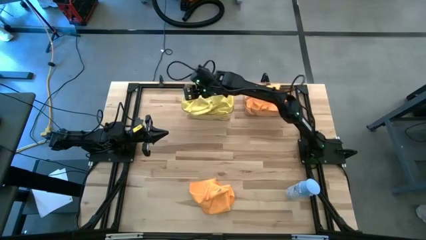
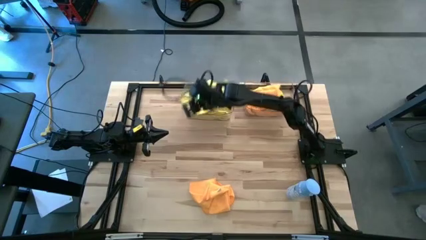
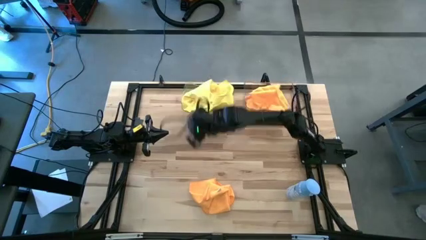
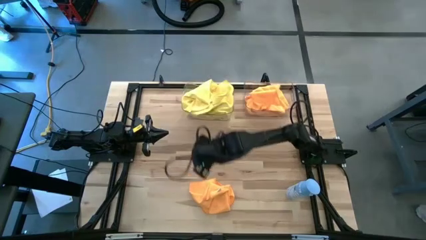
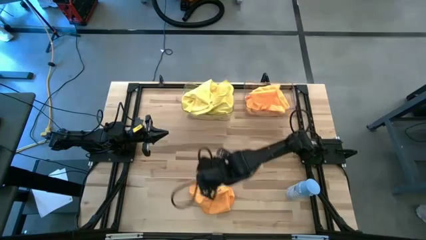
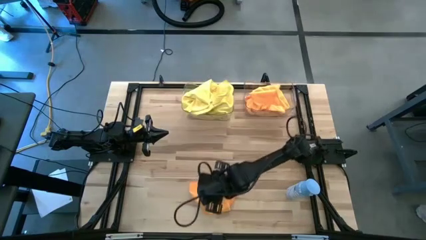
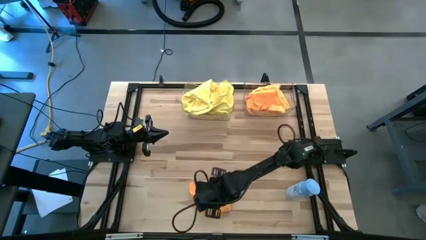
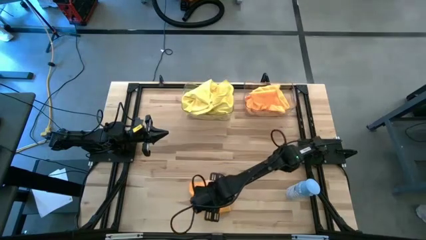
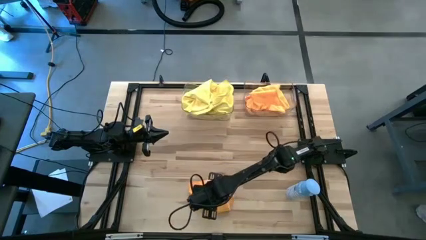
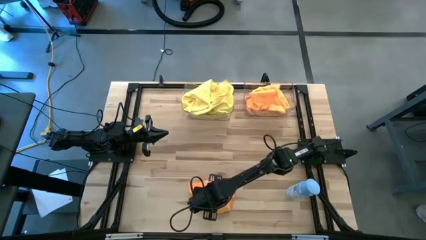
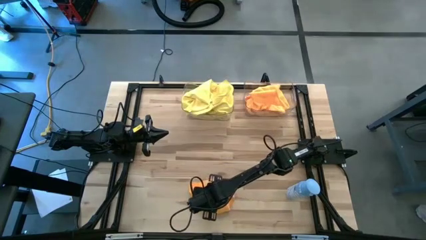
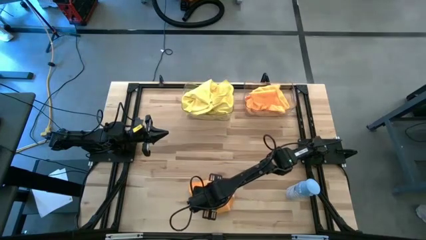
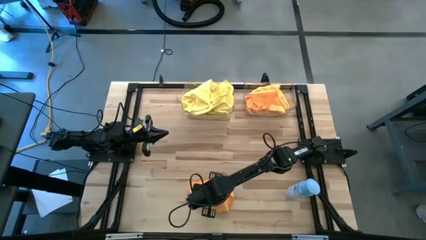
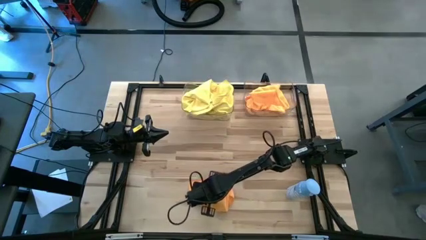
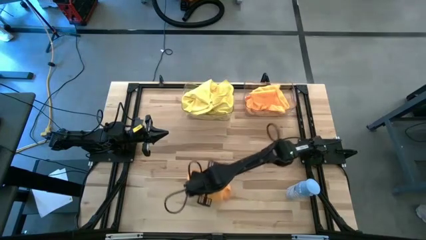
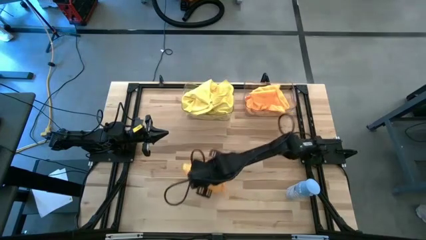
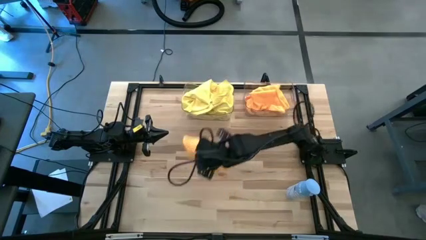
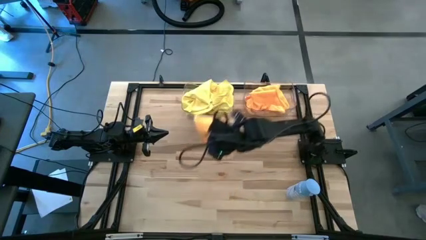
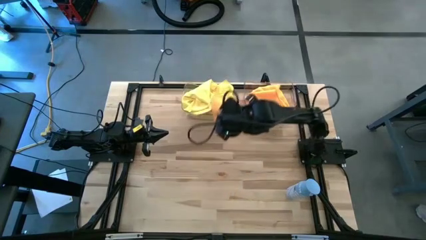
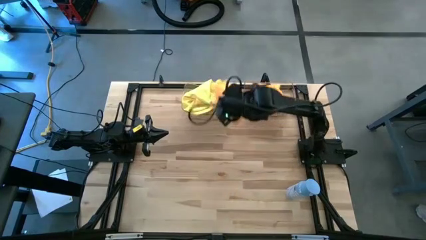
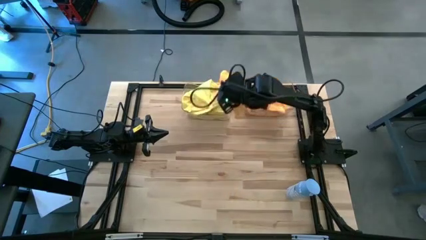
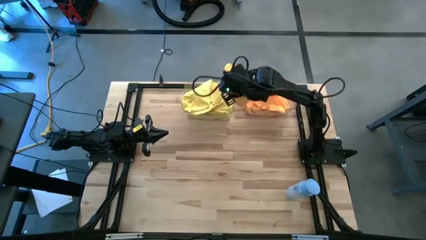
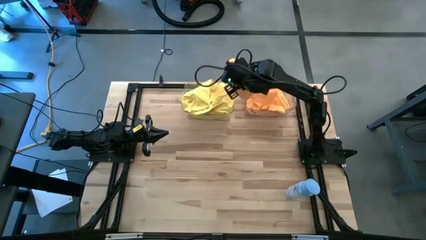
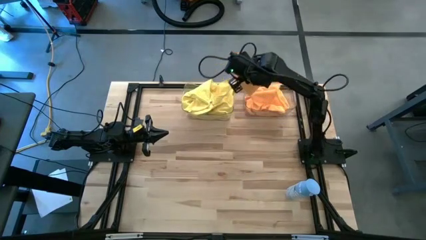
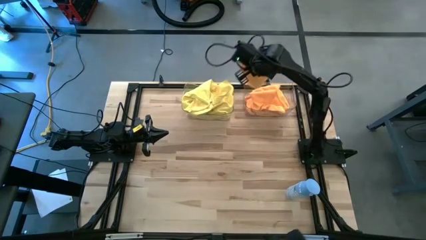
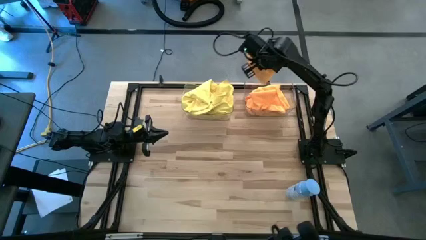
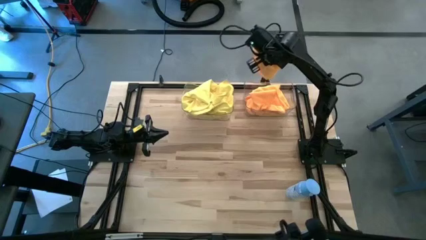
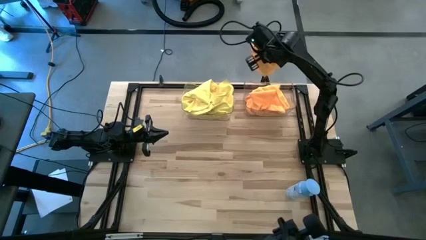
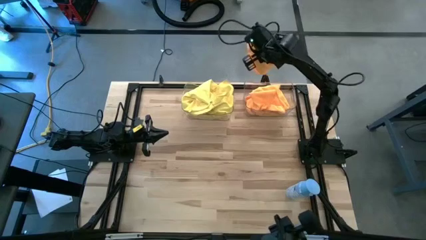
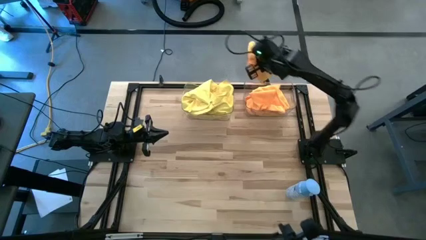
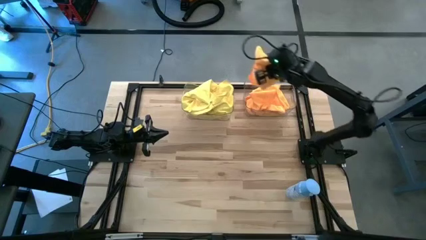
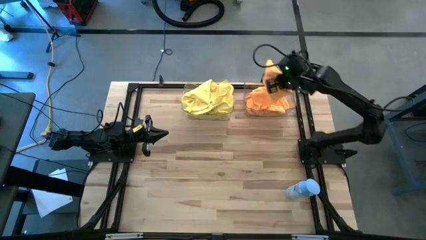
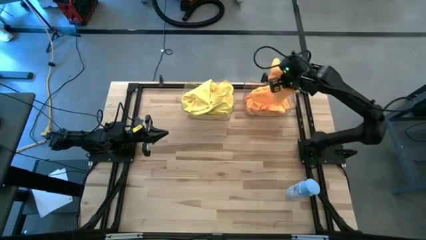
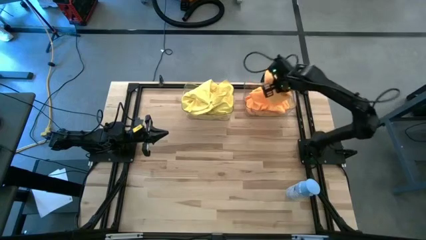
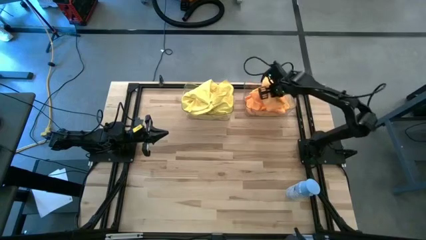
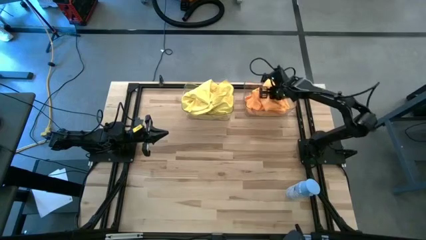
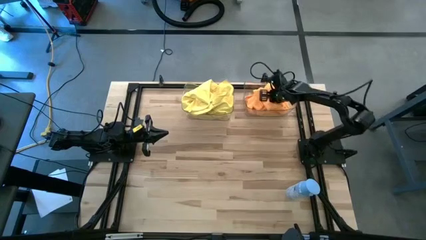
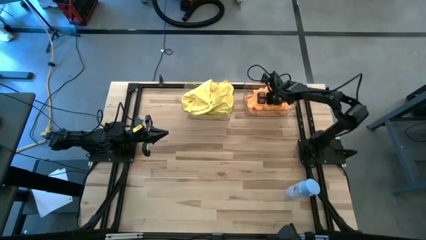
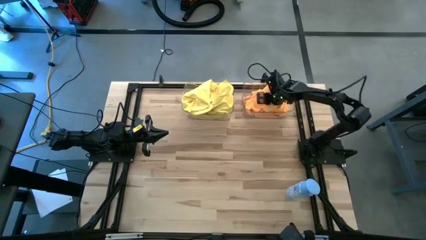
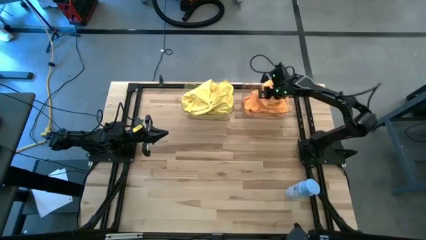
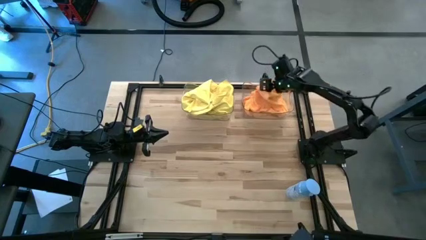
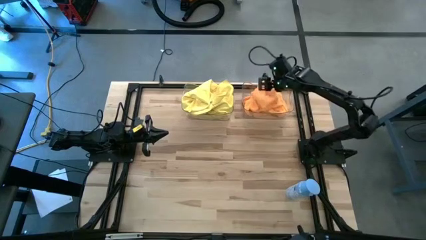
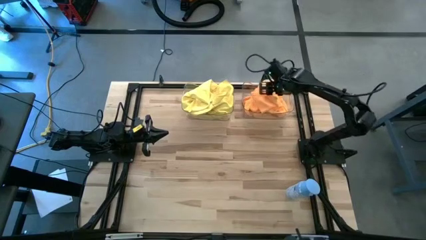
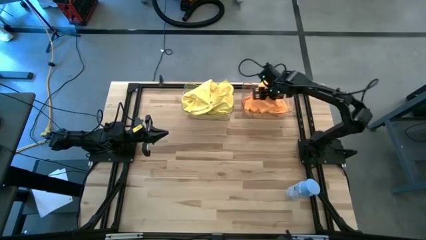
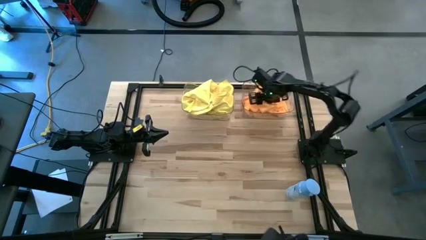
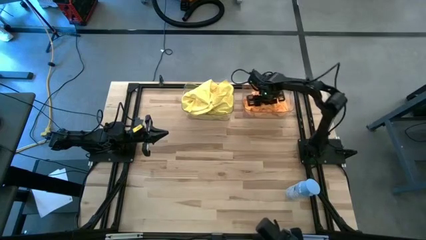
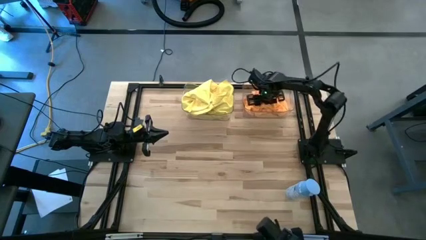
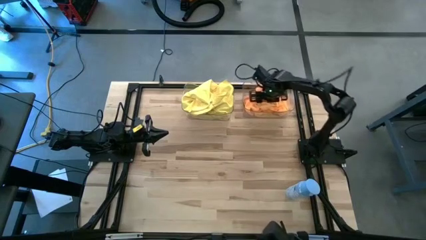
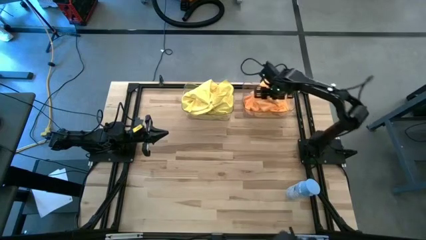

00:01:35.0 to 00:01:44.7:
Task: Sort microfiber towel by color & place in baskets
Put the orange microfiber cloth into the right transparent bin

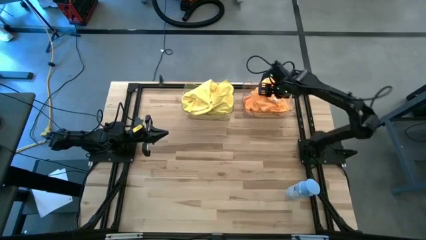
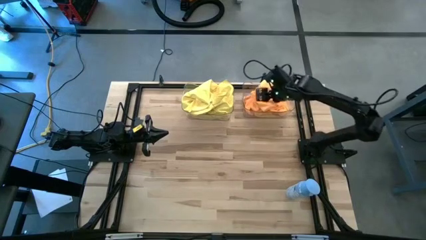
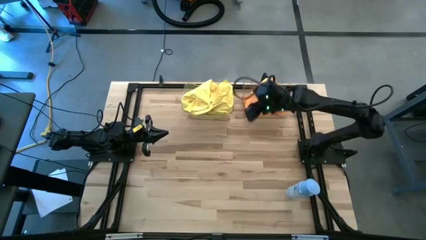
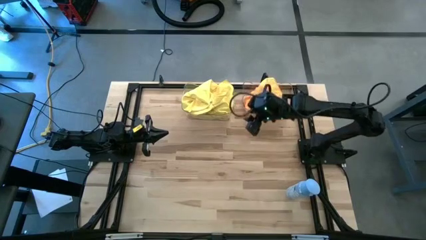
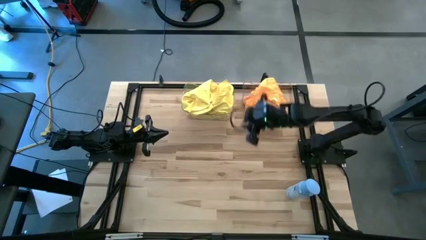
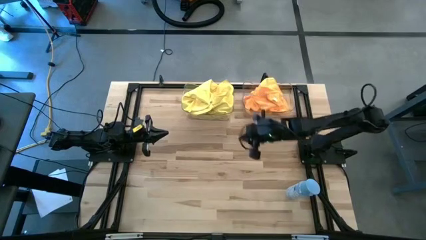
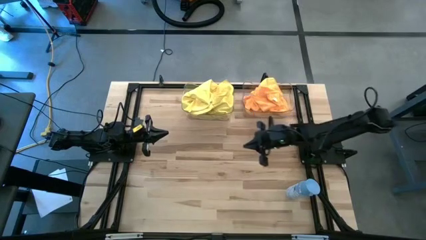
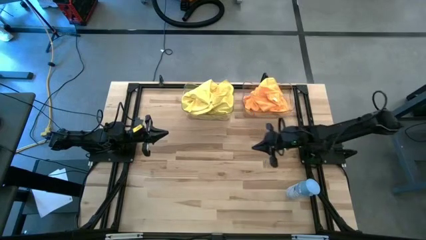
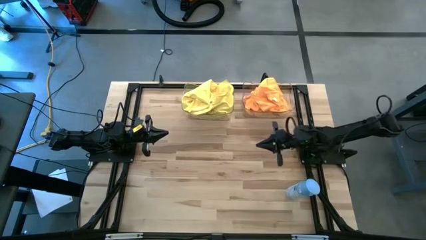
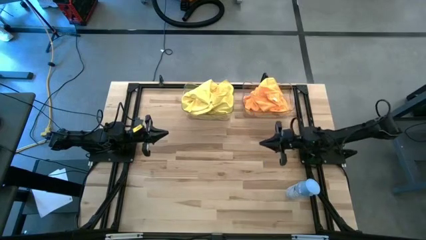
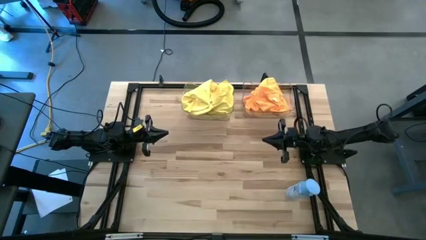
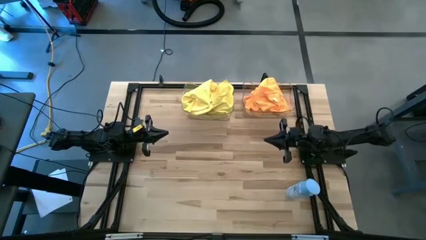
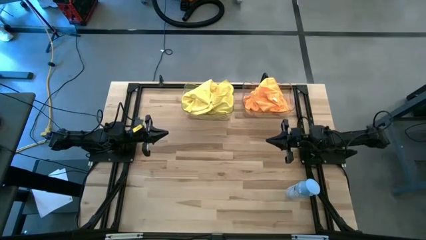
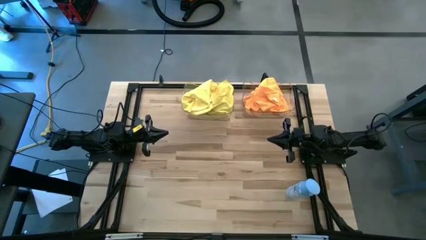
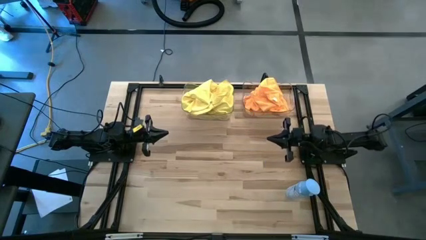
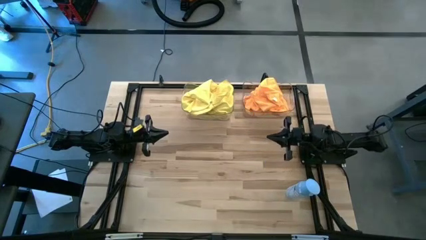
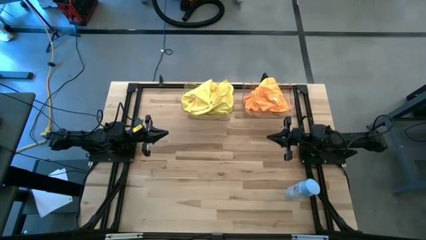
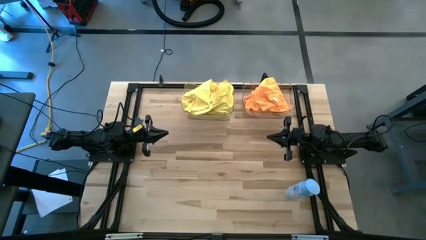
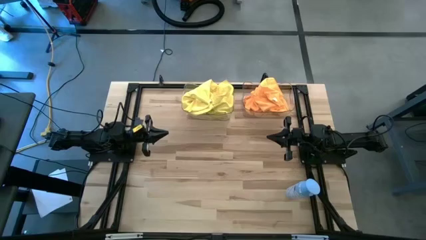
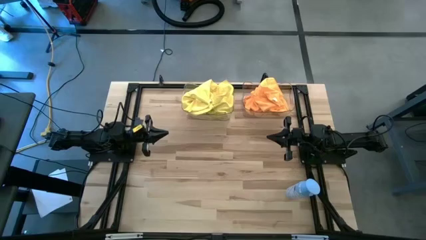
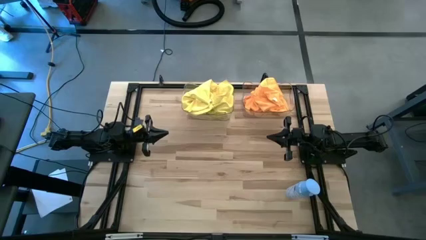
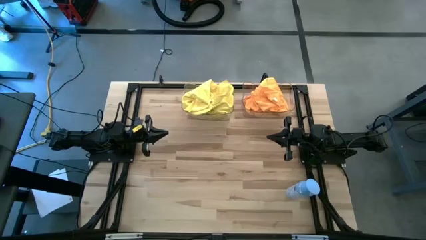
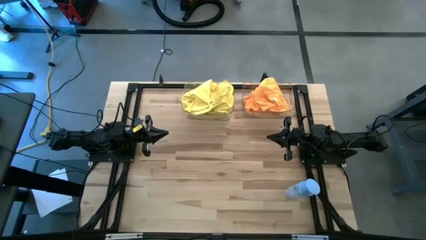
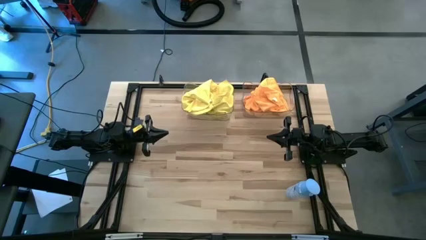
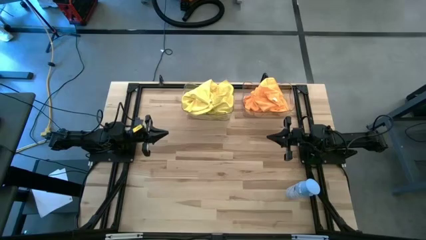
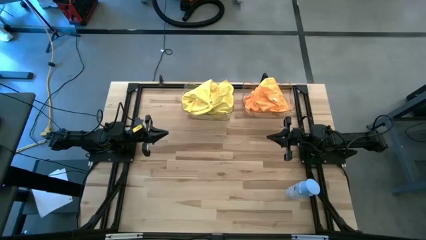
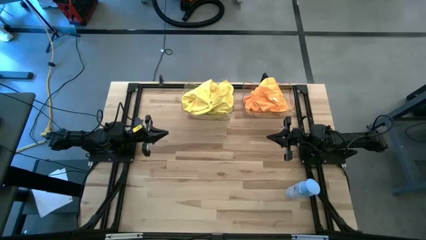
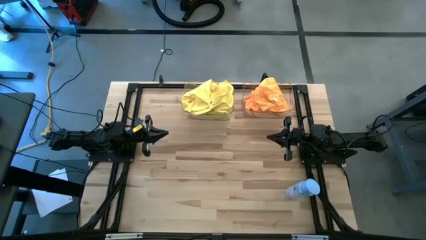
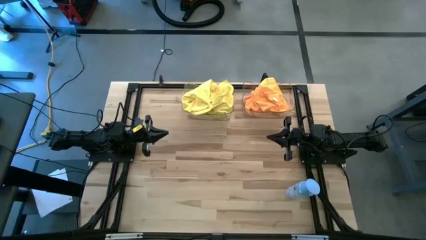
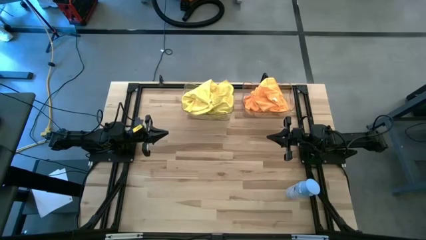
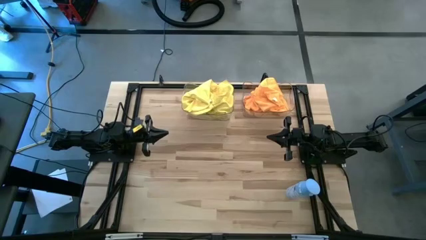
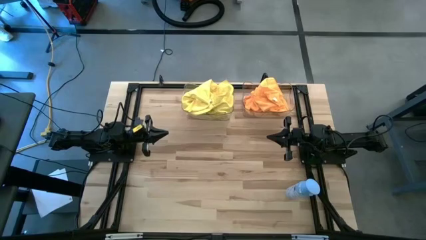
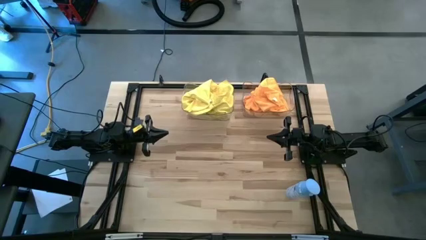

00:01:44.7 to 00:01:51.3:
Return to Home Position

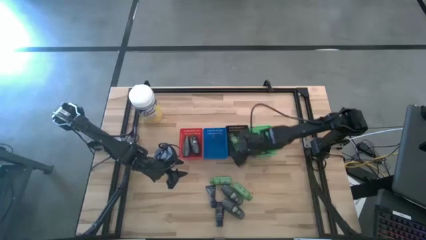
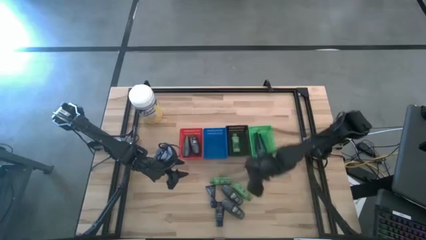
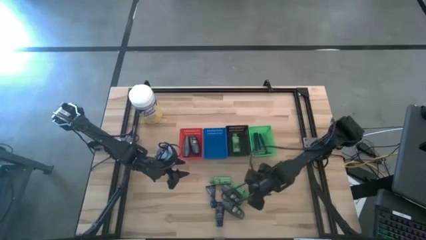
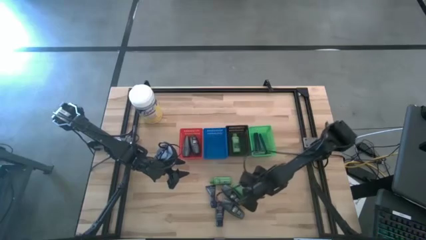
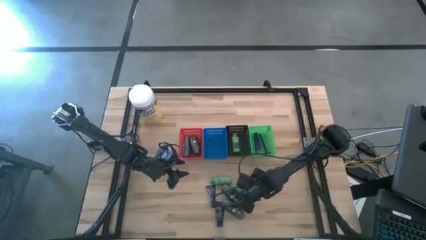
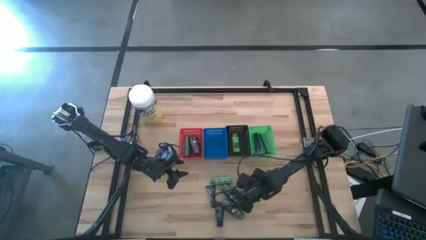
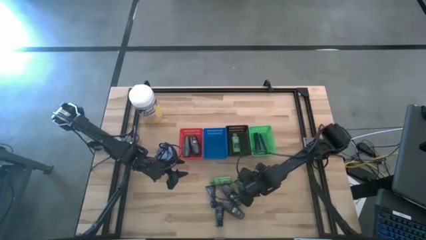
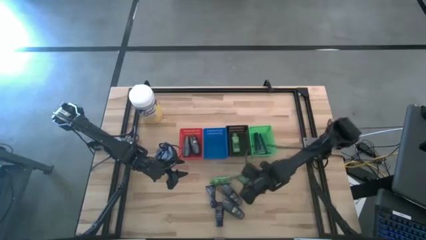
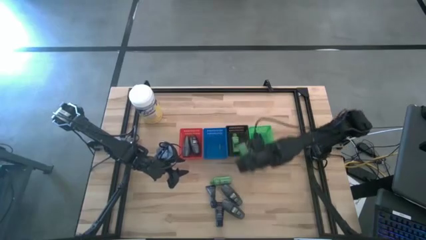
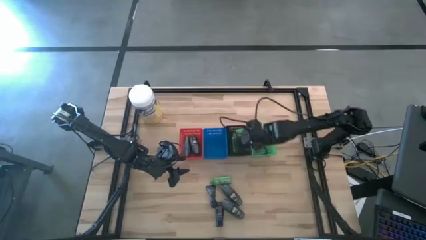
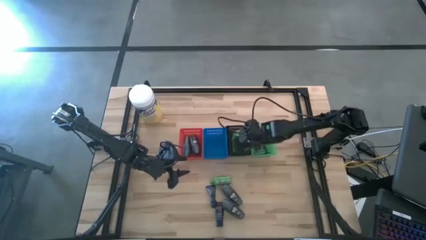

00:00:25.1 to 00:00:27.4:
Task: Pick & Place Travel size toiletries
Put the green shampoo into the black bin
